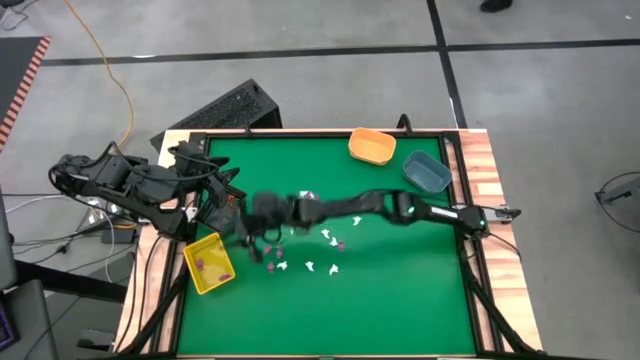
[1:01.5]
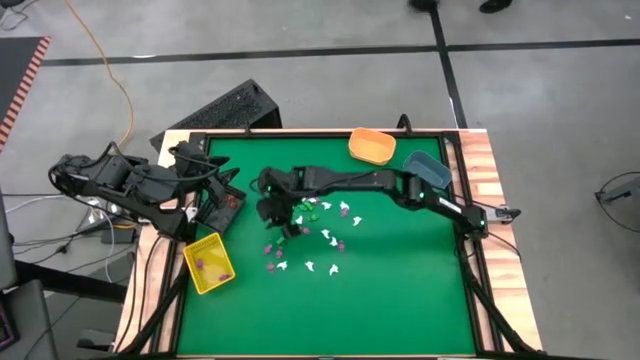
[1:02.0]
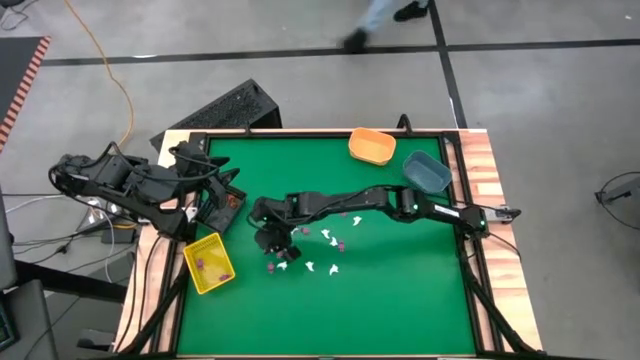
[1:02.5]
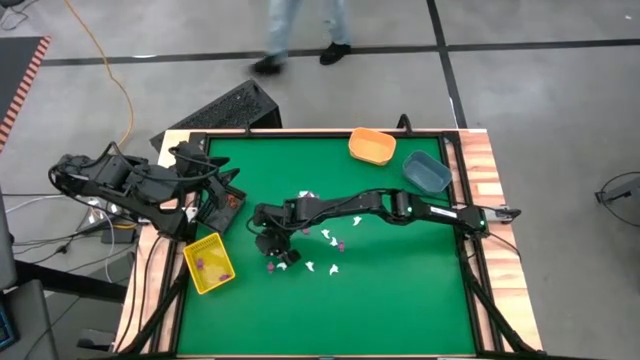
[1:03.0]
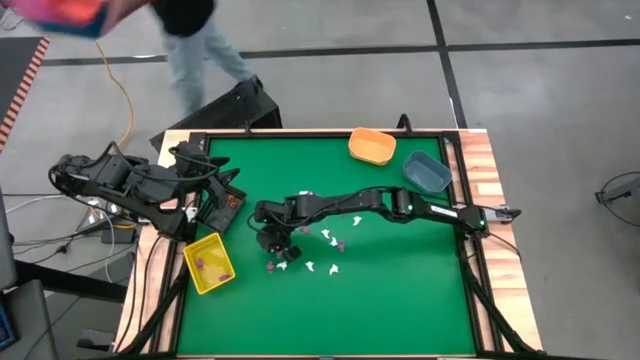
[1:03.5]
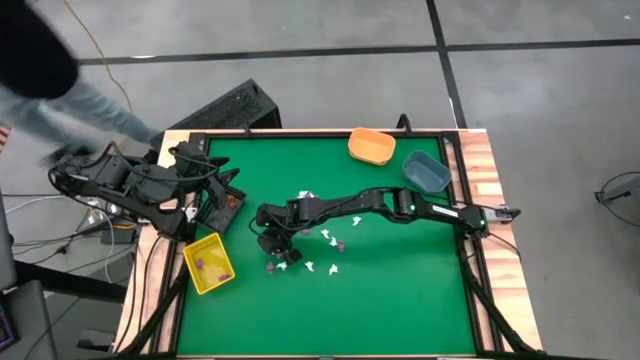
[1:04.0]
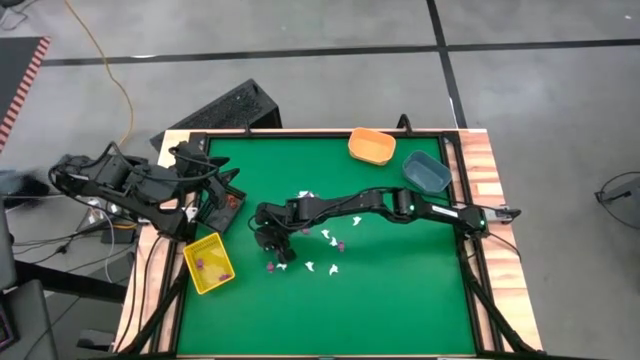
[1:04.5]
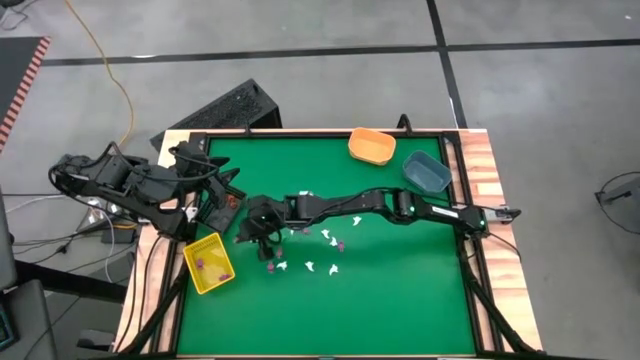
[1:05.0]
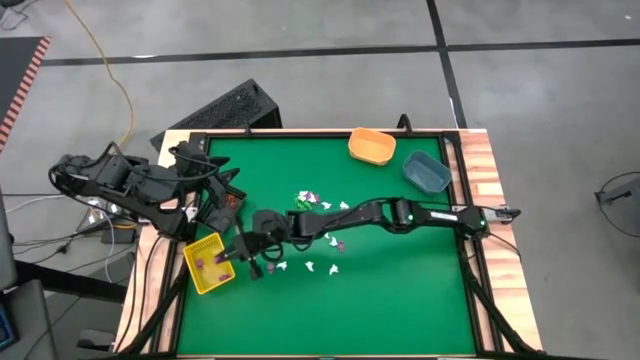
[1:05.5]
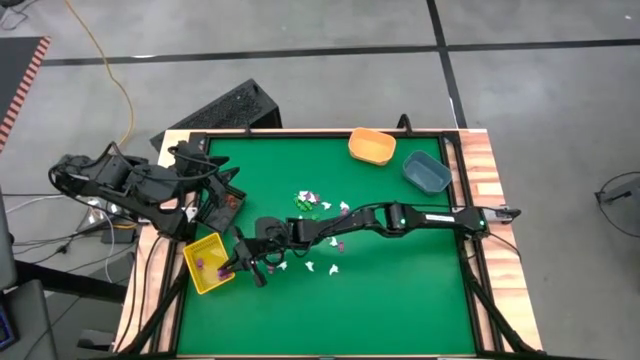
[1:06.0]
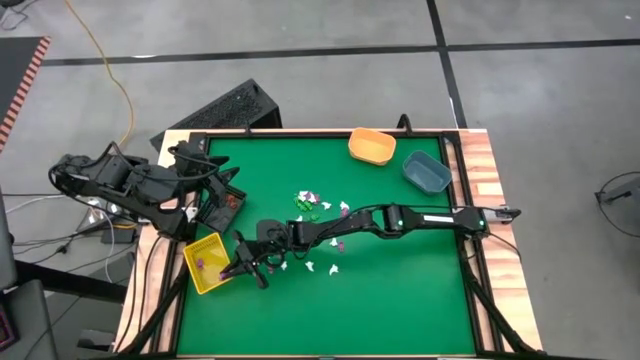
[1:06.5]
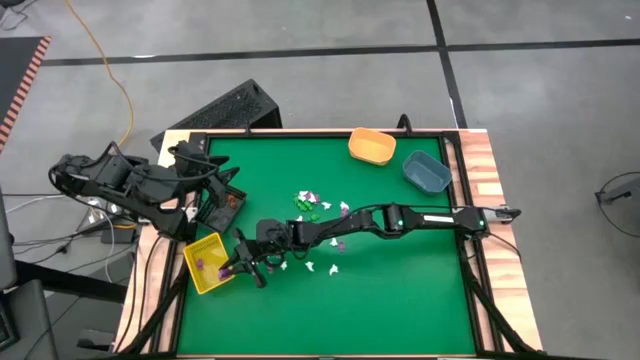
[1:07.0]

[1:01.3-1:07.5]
Task: Sort Halloween decoration
Put the pink skeleton toy into the yellow bin

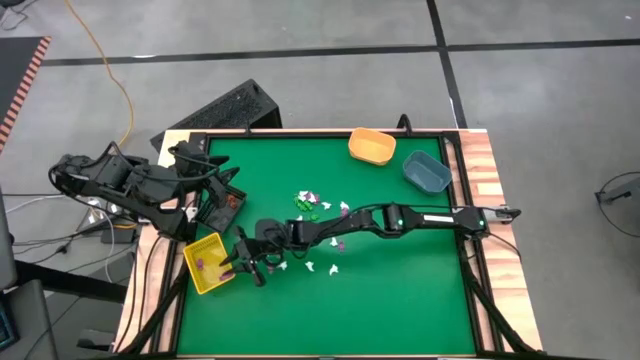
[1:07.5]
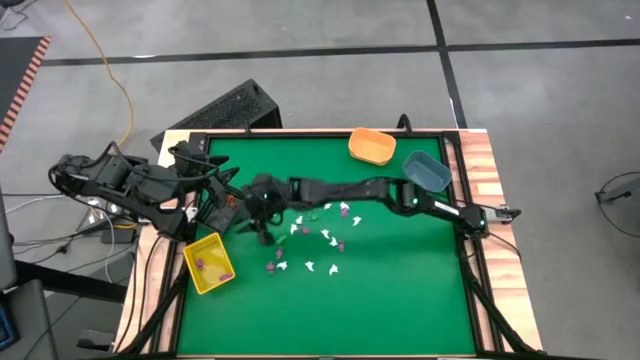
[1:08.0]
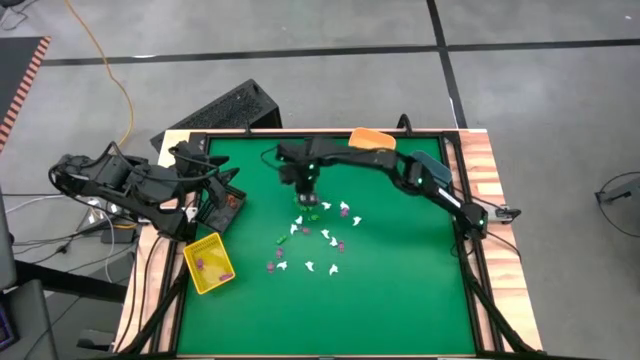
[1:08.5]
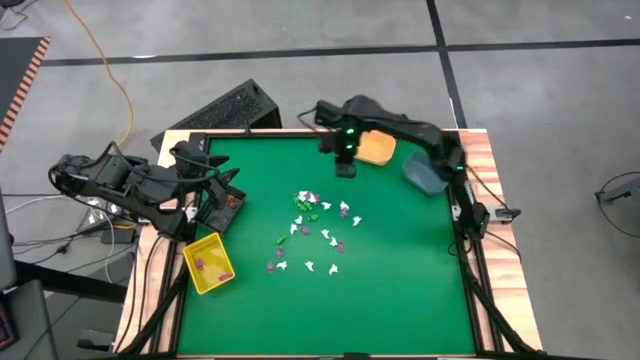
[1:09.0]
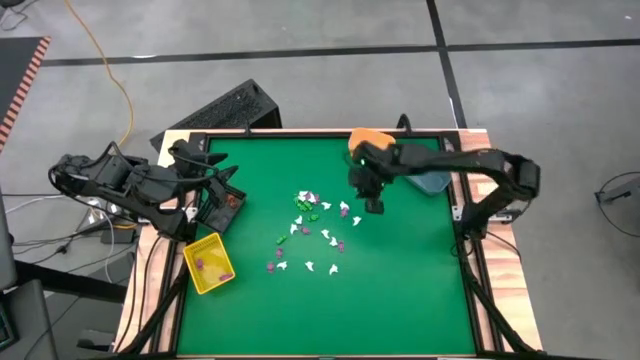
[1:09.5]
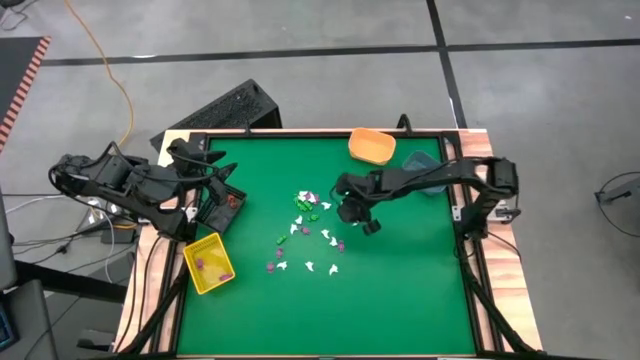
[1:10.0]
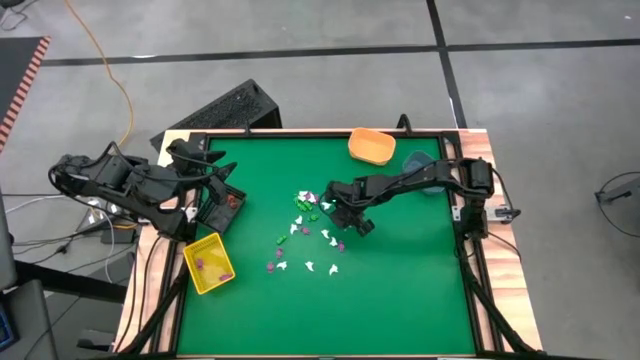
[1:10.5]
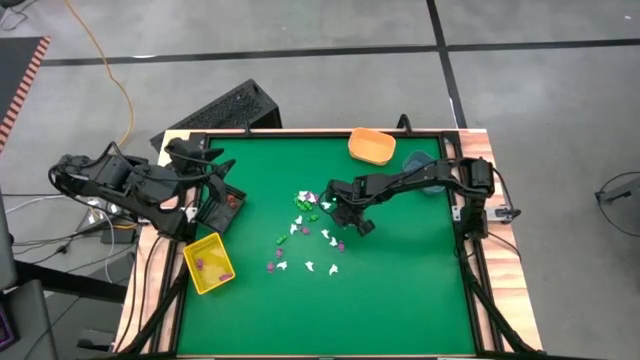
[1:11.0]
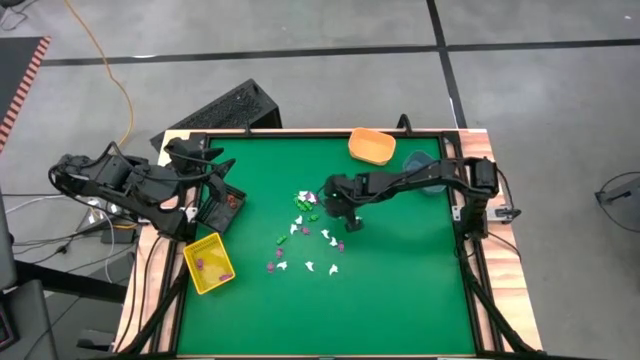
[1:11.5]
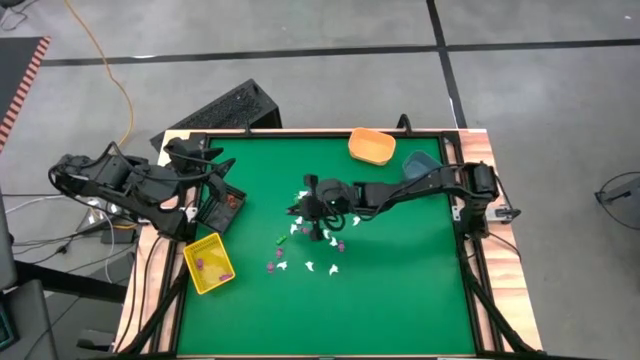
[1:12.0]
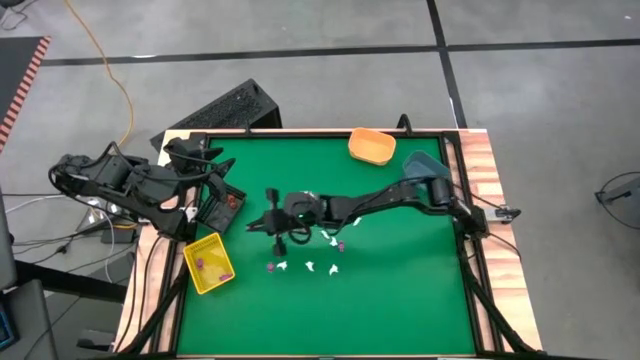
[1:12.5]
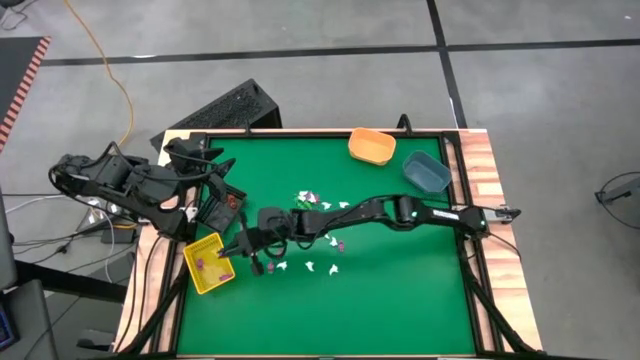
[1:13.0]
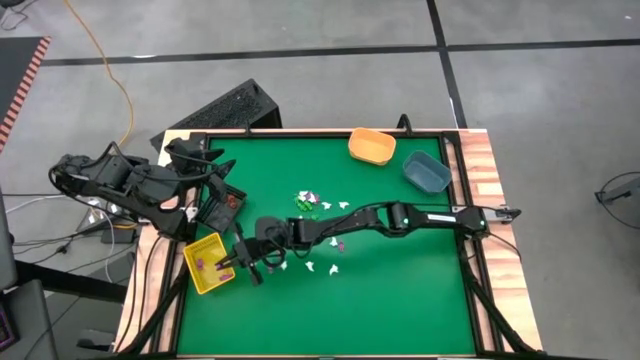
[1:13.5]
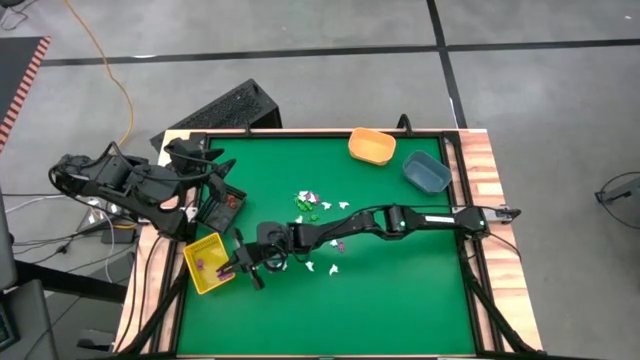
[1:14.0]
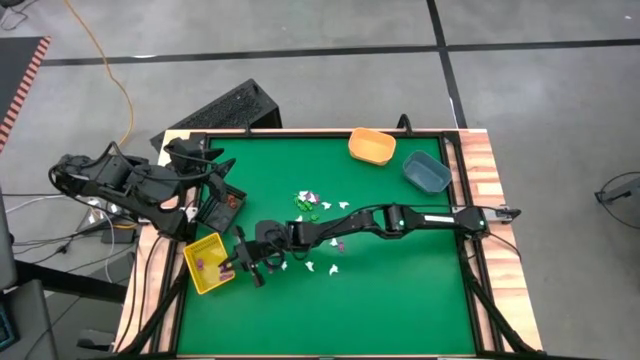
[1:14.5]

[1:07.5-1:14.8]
Put the pink skeleton toy into the yellow bin

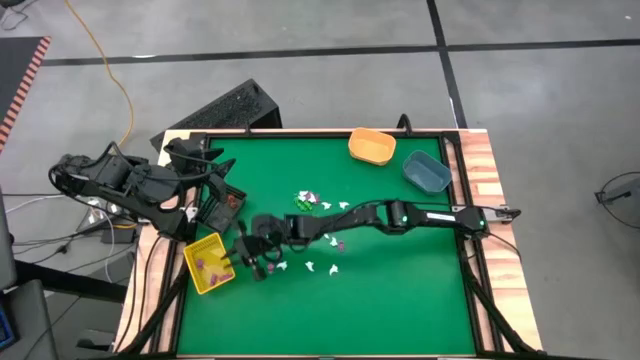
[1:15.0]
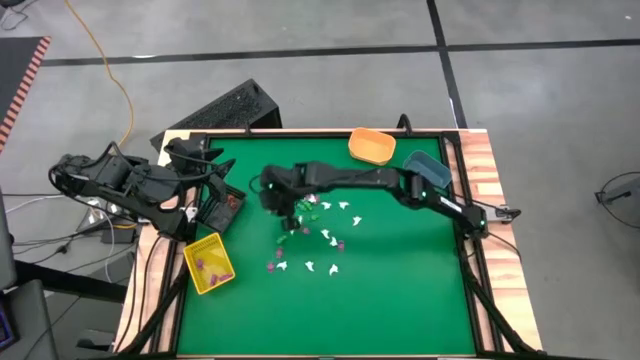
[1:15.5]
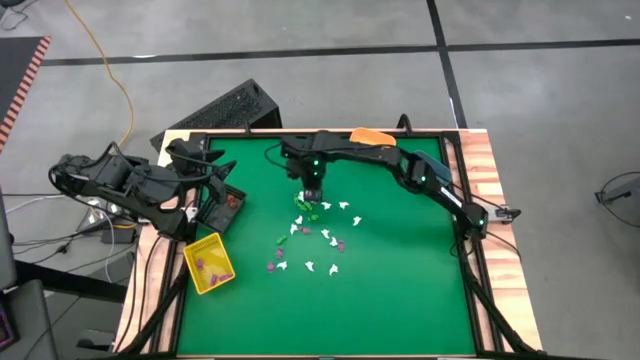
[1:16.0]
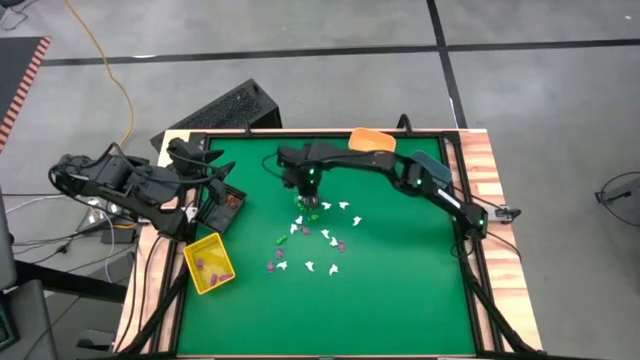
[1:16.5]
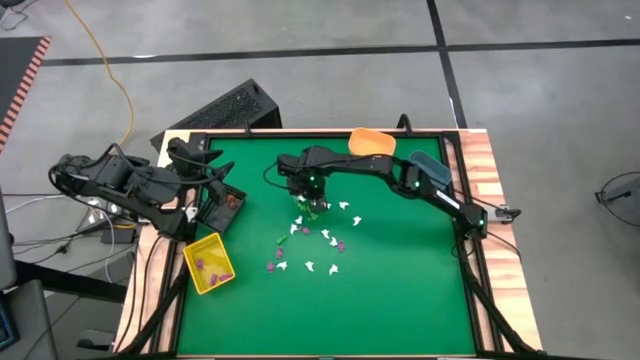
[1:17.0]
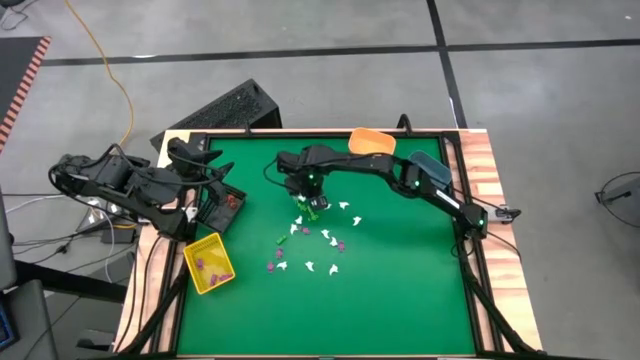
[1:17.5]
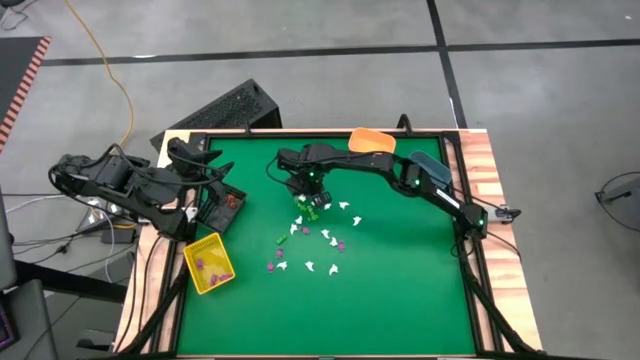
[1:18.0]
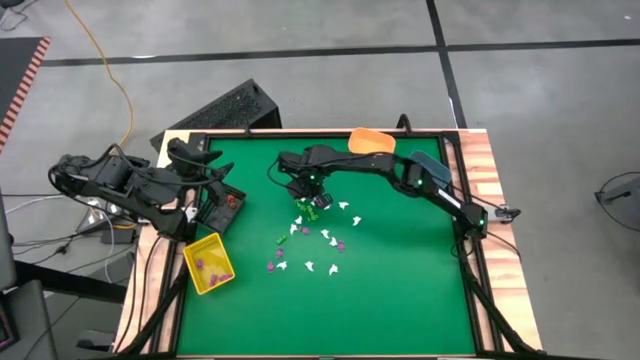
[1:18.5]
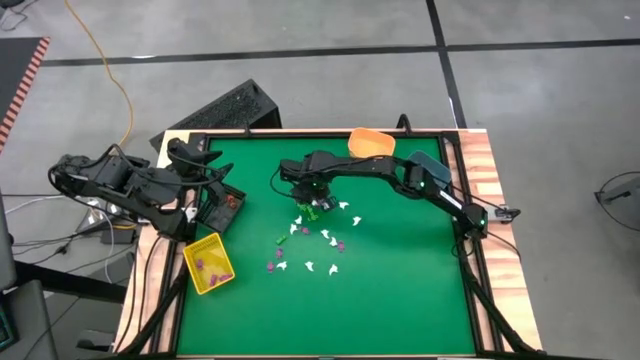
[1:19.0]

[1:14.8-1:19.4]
Put the pink skeleton toy into the yellow bin

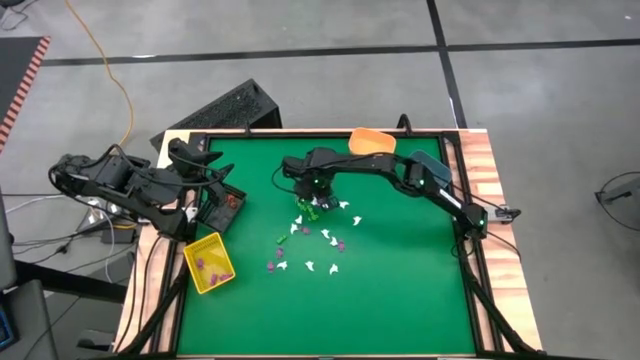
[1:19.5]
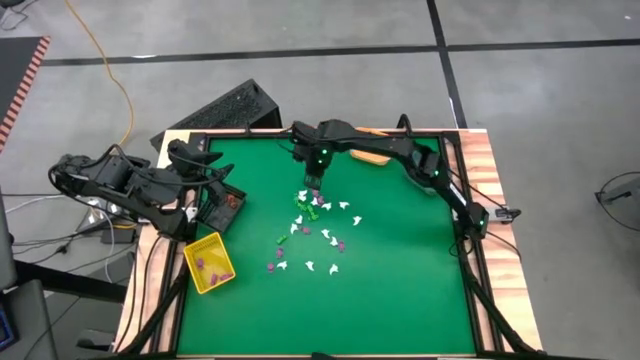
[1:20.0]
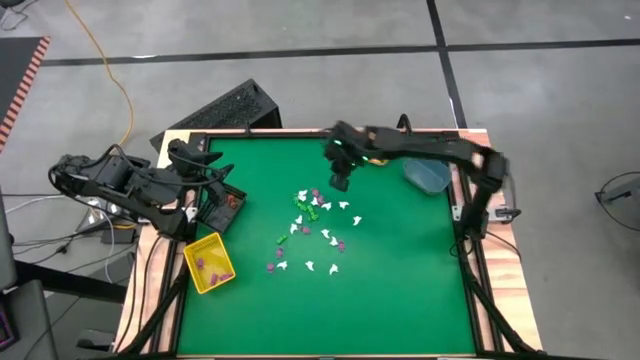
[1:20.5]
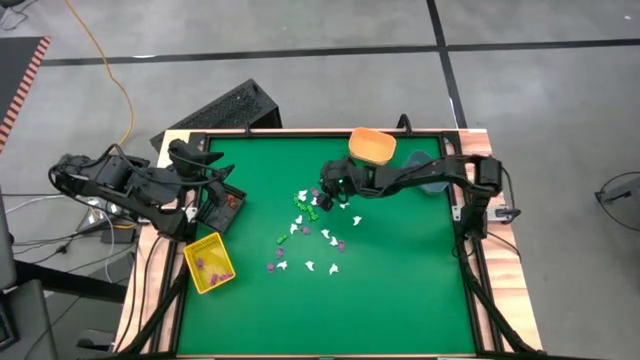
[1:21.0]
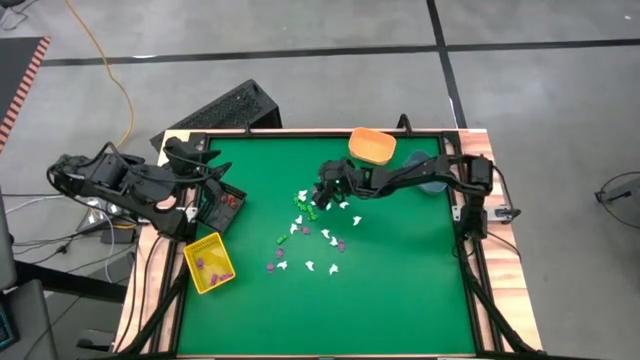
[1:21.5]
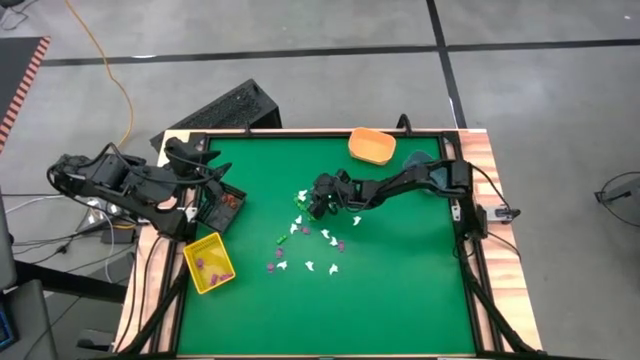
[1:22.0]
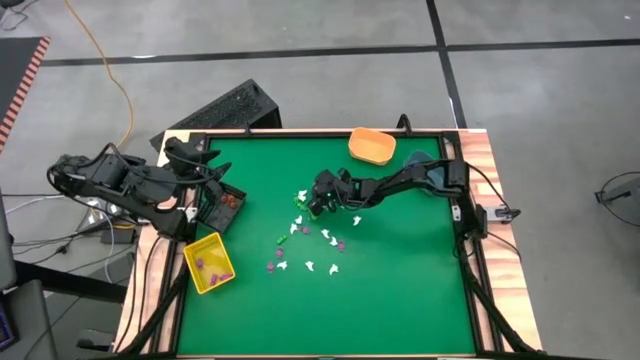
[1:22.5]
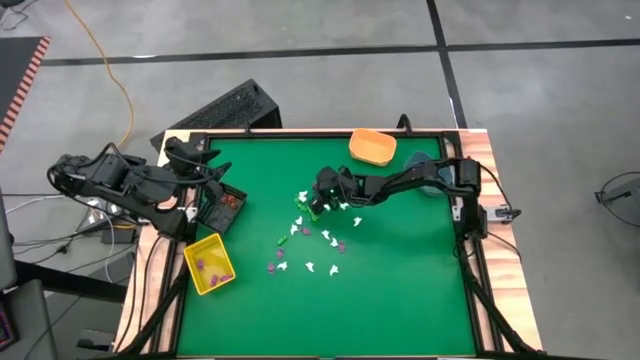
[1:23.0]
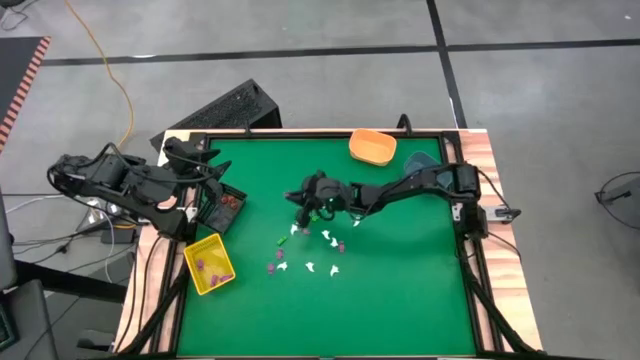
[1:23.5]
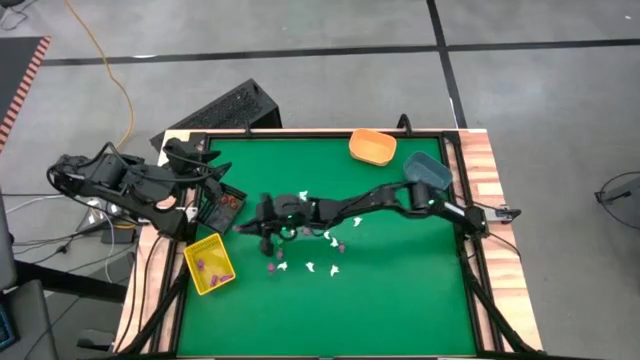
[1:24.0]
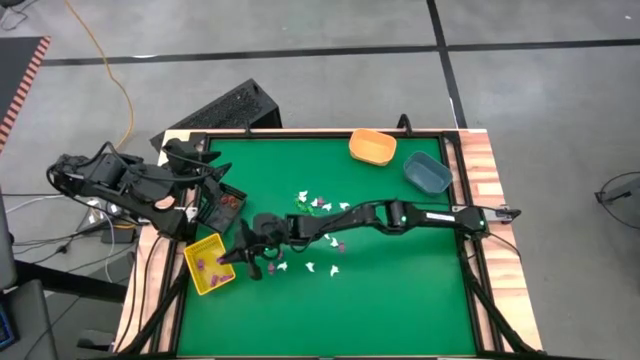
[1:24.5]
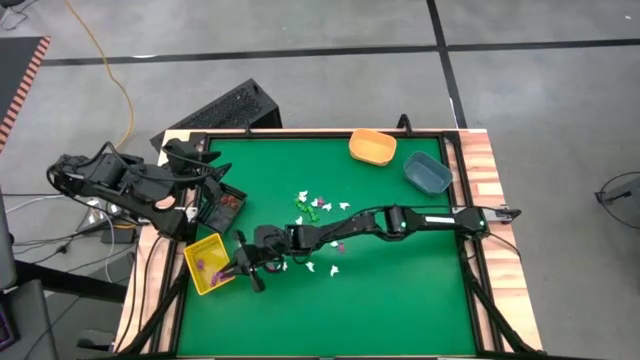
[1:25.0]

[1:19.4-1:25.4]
Put the pink skeleton toy into the yellow bin
